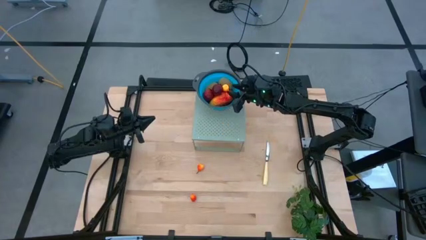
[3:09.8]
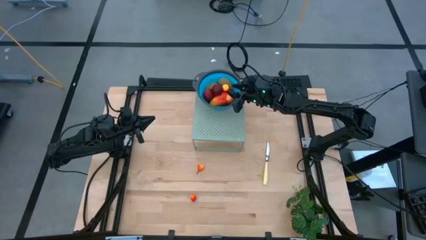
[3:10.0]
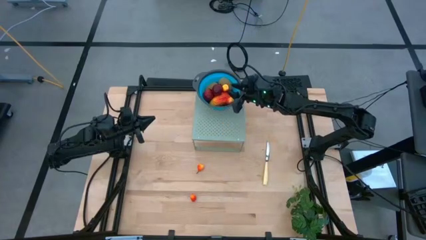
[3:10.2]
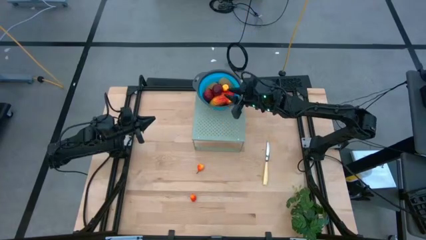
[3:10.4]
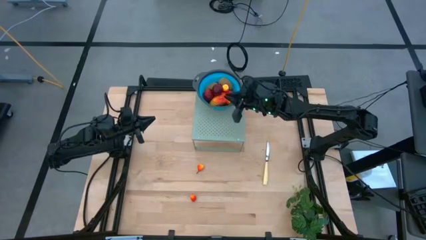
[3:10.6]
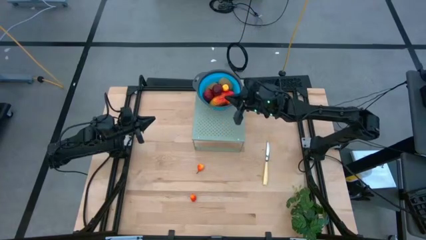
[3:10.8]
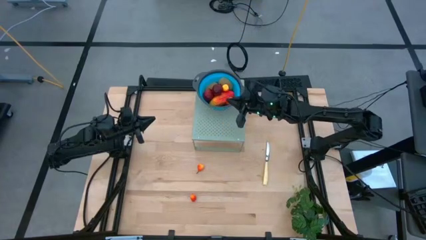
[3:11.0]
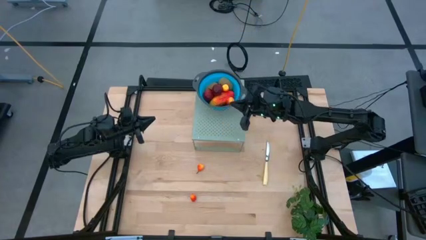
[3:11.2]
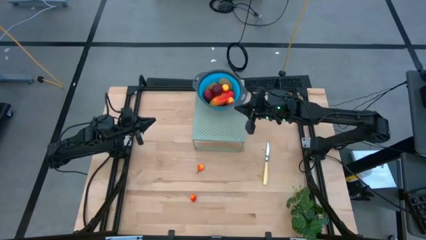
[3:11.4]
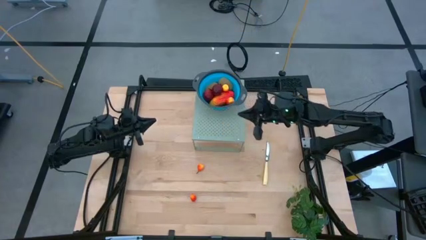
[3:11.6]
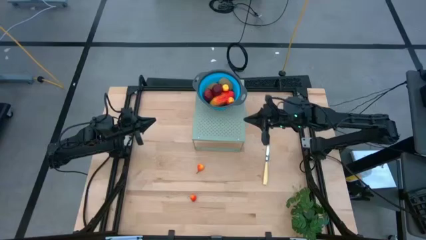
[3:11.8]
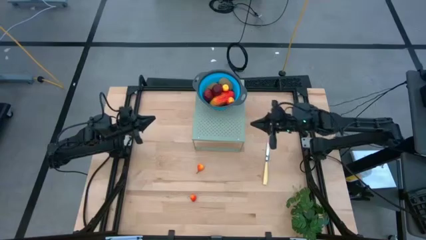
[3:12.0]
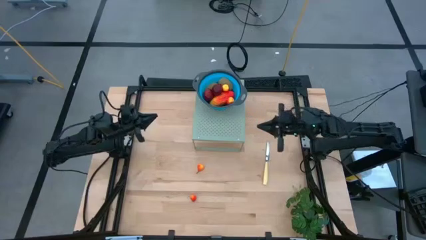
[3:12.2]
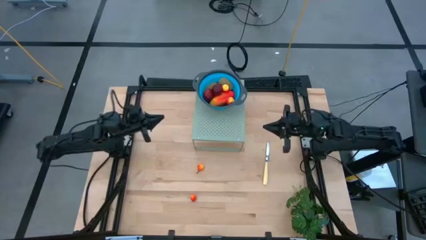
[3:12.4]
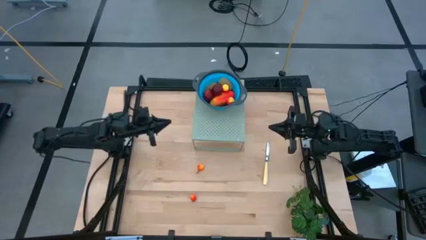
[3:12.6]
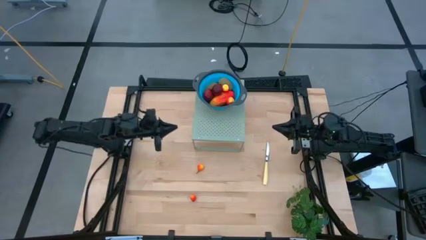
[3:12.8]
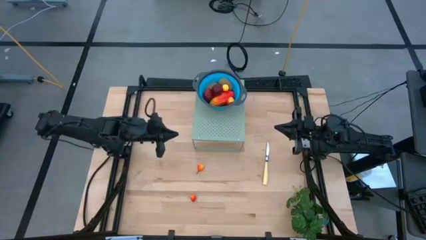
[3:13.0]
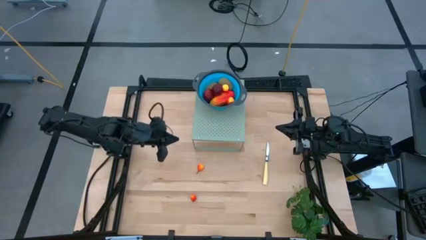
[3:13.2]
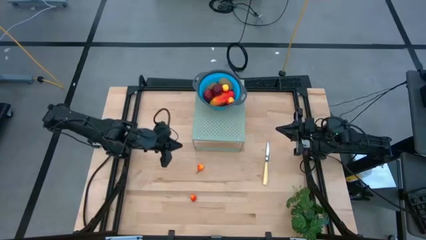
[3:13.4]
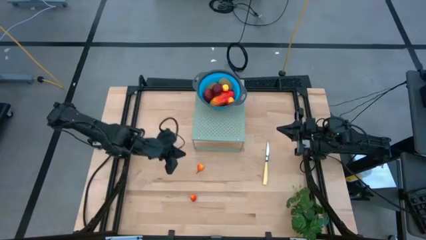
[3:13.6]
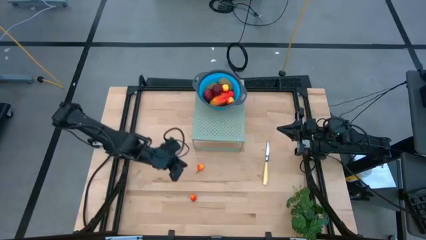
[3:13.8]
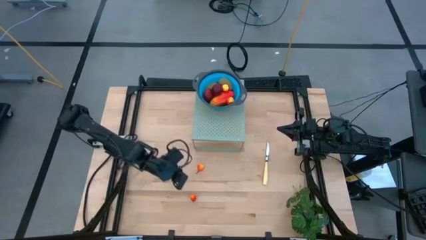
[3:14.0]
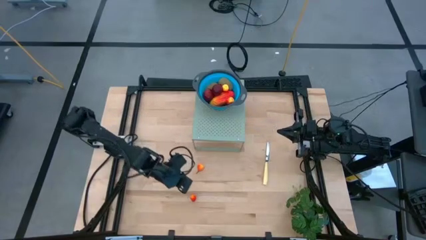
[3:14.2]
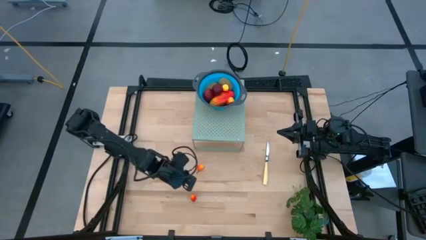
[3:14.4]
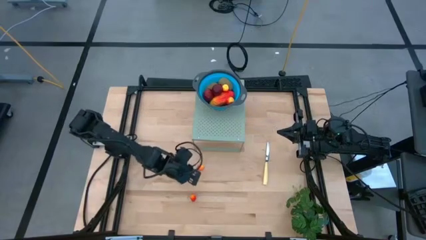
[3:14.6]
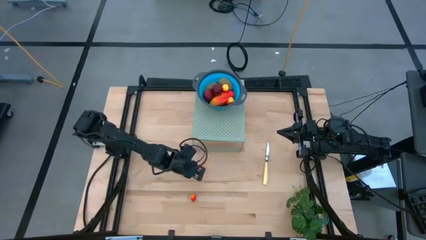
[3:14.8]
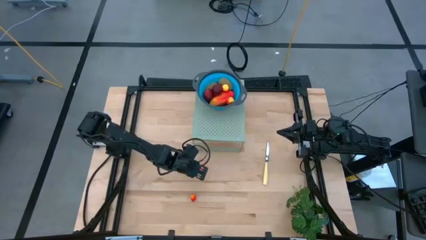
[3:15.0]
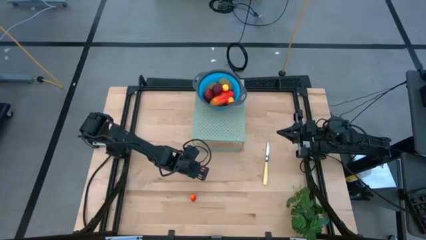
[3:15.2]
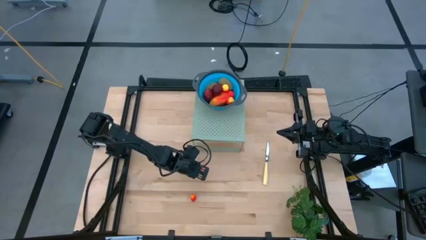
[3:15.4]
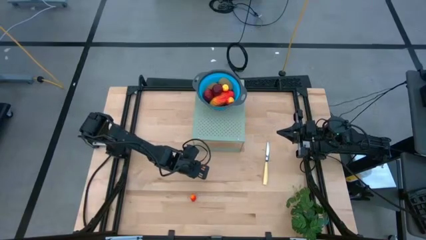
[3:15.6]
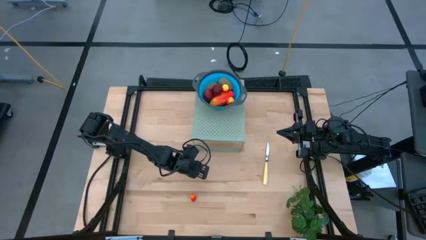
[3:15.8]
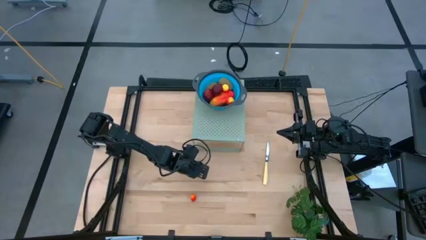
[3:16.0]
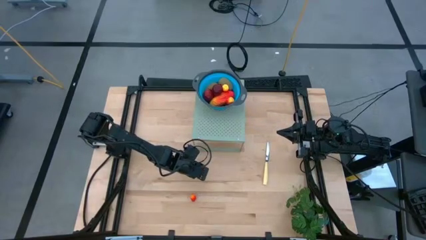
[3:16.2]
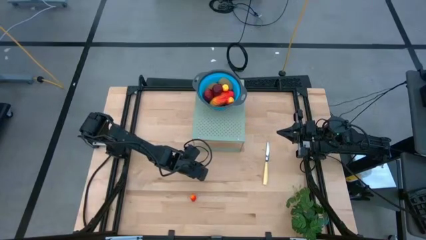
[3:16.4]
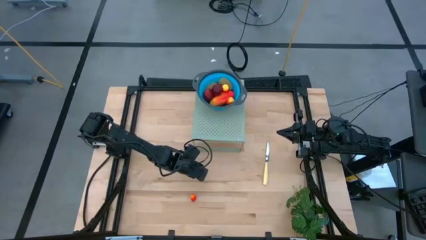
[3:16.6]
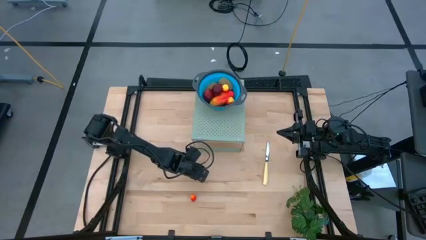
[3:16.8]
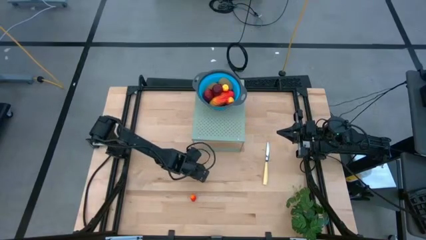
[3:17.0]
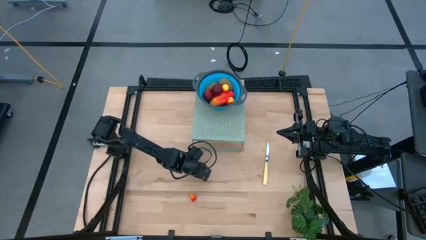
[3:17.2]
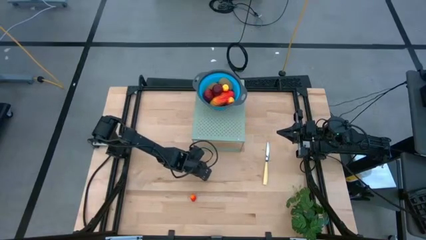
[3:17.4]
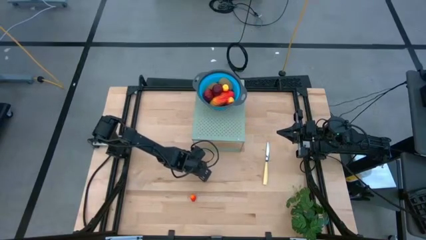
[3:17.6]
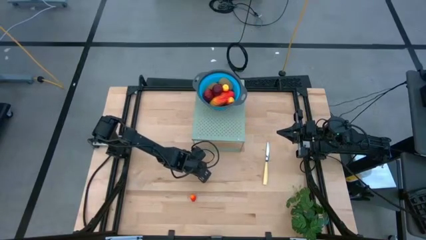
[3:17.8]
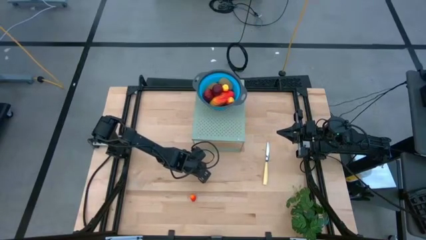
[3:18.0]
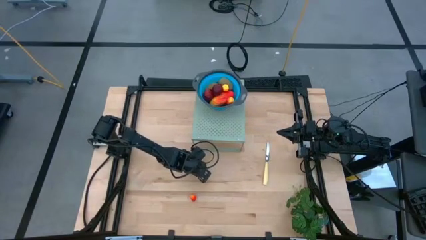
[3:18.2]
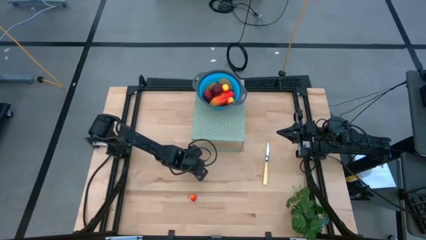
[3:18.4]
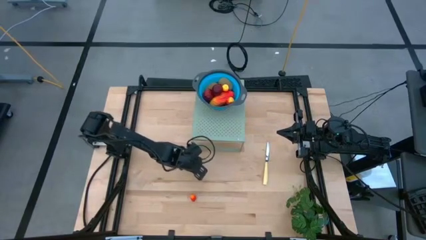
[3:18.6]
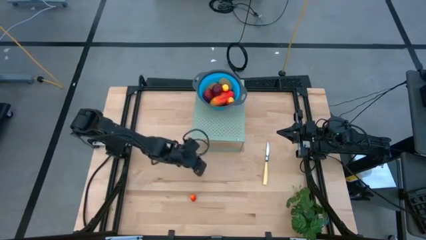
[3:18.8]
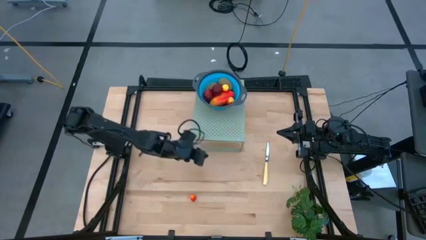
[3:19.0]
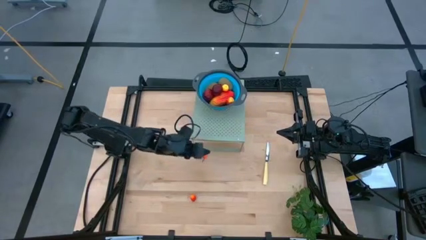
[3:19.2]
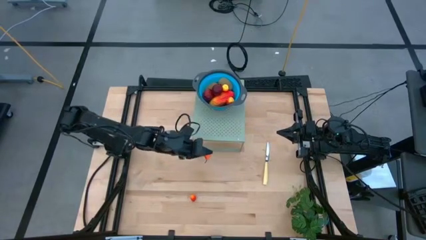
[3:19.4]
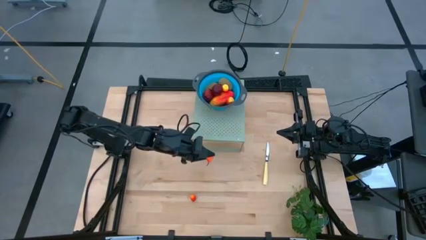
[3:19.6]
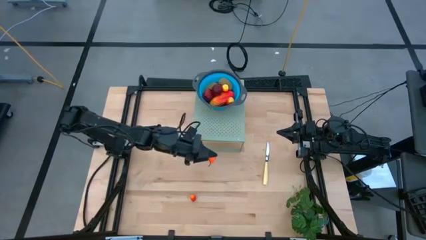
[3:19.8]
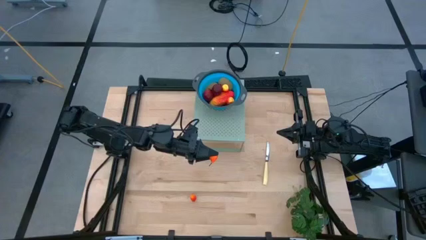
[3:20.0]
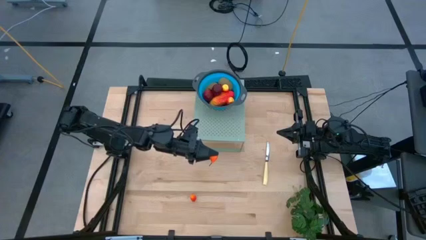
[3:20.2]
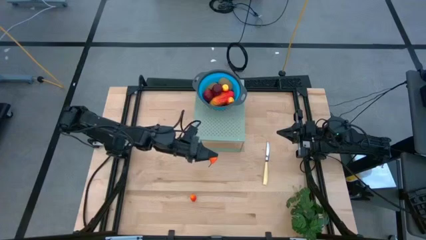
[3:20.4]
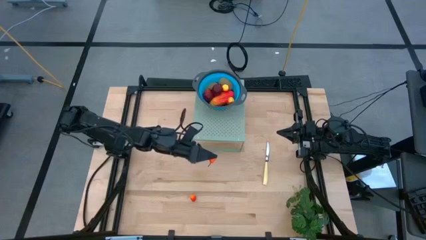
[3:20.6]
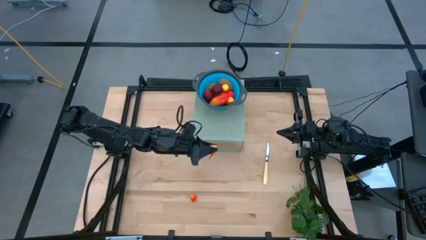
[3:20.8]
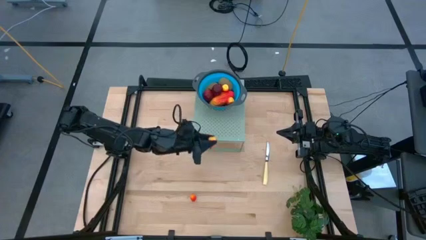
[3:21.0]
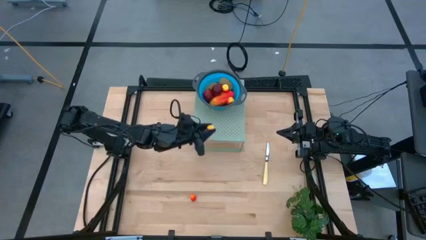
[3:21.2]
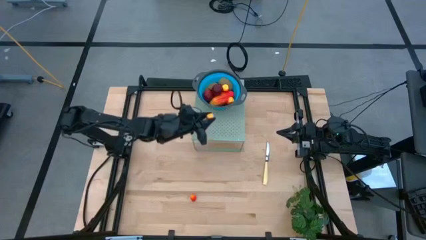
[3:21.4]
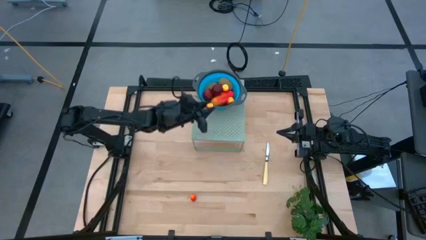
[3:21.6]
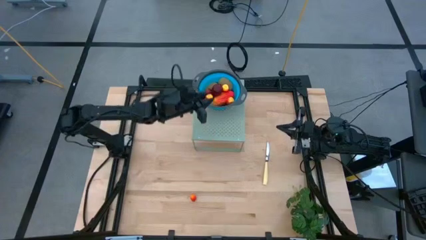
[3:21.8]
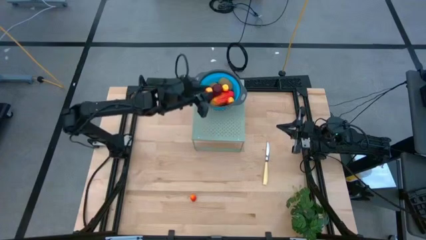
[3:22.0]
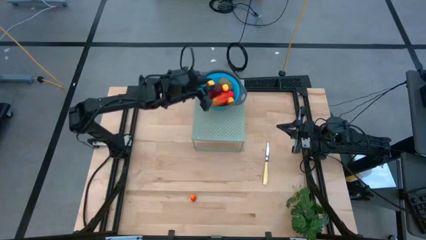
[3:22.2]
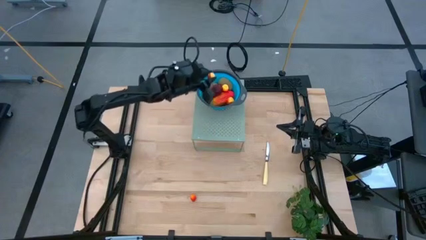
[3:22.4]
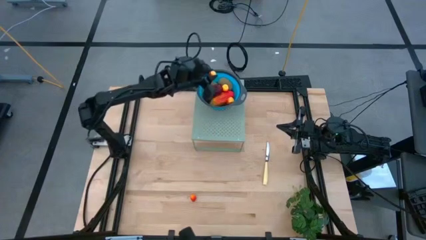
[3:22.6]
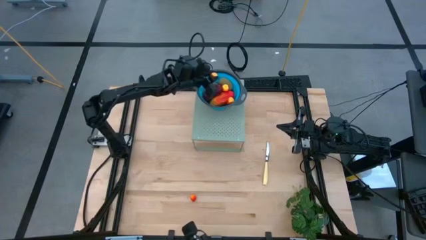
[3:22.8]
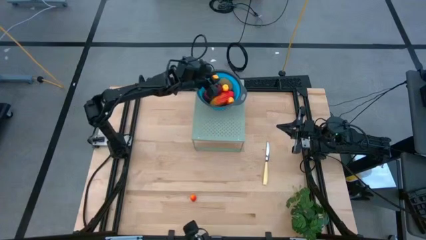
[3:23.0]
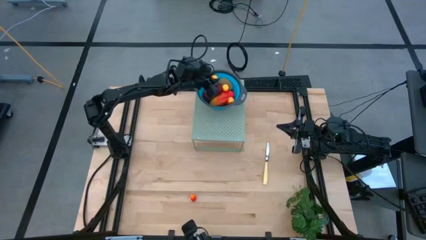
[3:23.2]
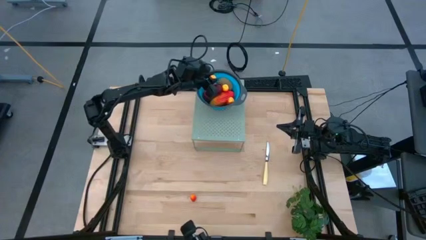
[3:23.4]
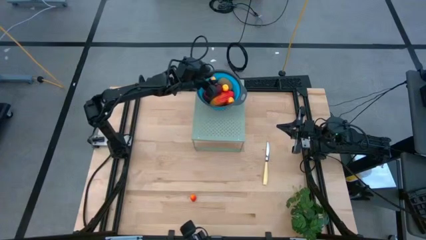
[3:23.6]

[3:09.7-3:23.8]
Task: Pick & Place Fruit
Put the peach into the blue strainer bowl on the shelf
